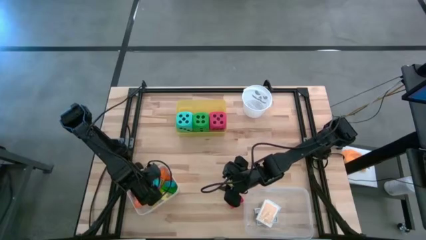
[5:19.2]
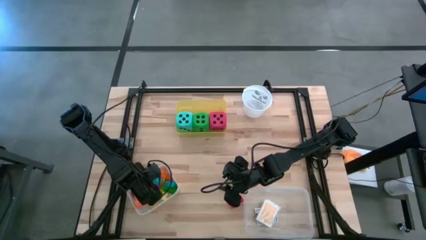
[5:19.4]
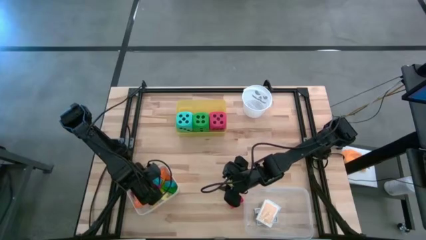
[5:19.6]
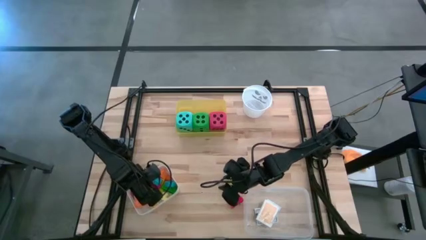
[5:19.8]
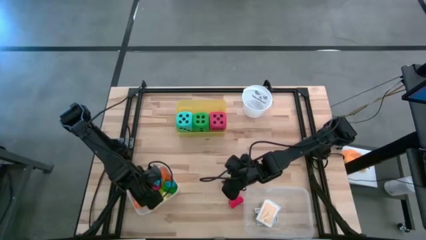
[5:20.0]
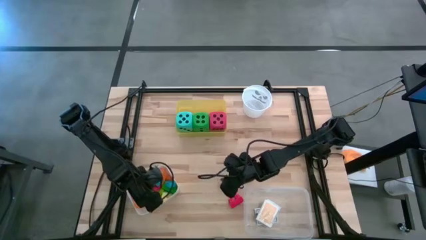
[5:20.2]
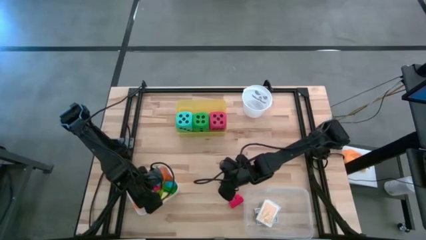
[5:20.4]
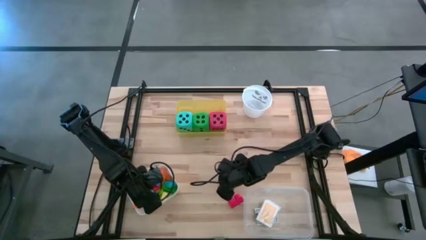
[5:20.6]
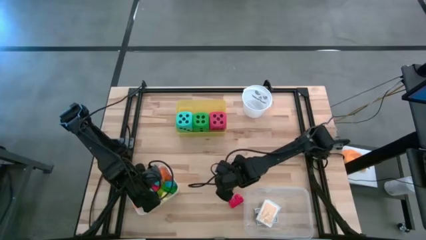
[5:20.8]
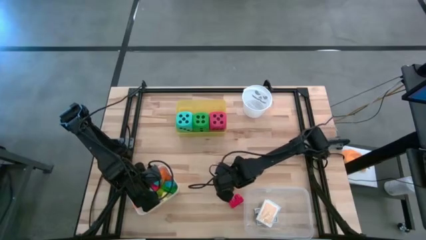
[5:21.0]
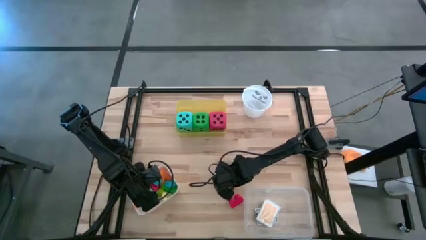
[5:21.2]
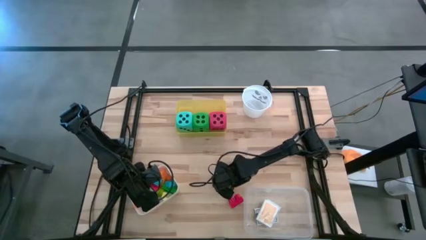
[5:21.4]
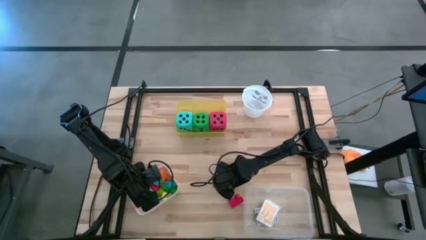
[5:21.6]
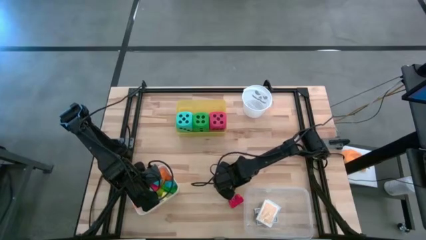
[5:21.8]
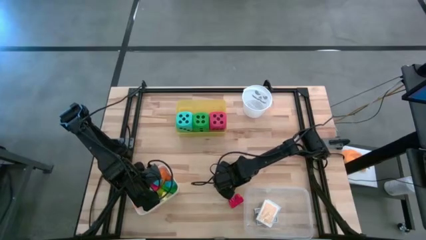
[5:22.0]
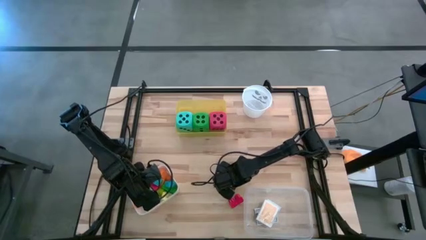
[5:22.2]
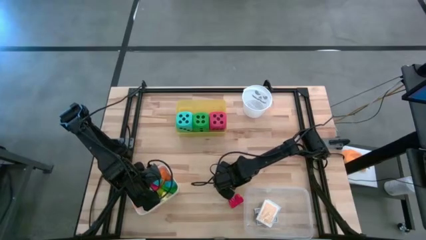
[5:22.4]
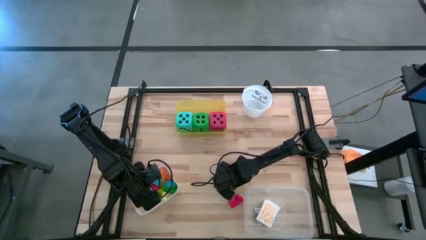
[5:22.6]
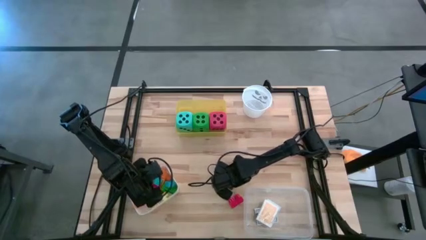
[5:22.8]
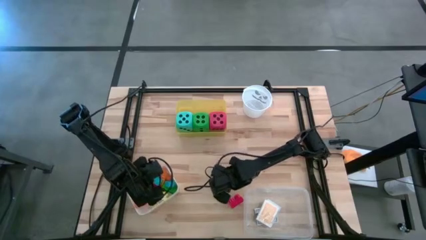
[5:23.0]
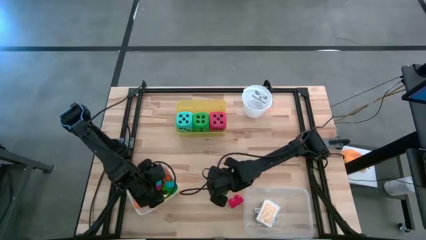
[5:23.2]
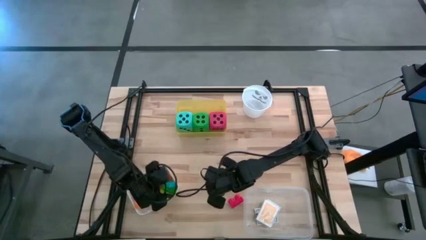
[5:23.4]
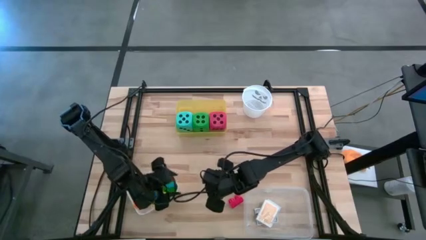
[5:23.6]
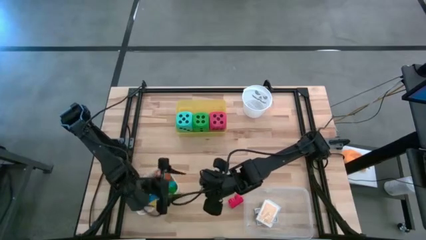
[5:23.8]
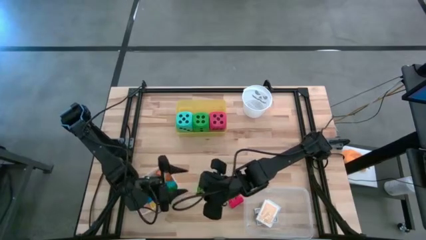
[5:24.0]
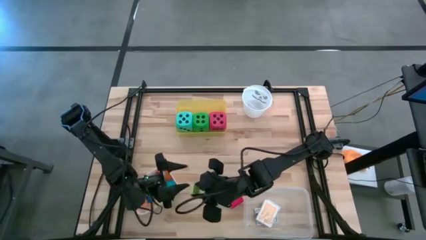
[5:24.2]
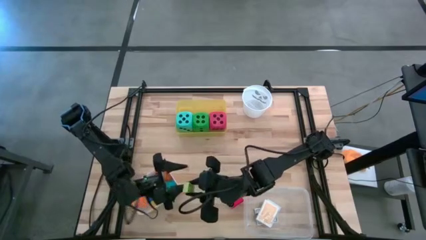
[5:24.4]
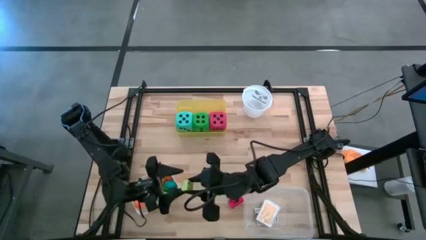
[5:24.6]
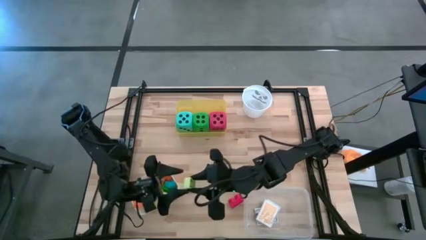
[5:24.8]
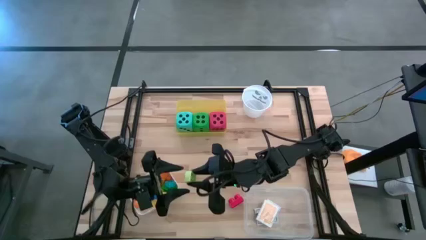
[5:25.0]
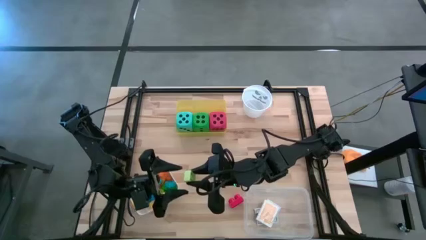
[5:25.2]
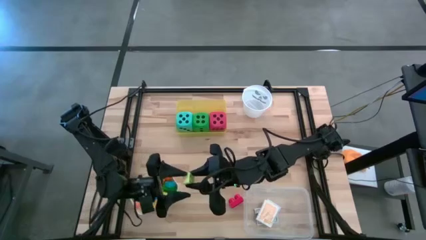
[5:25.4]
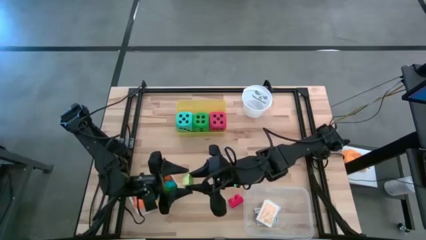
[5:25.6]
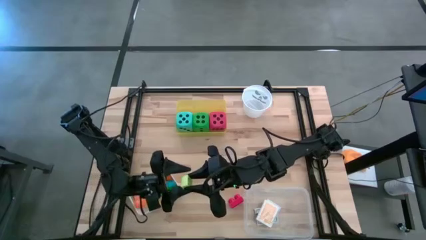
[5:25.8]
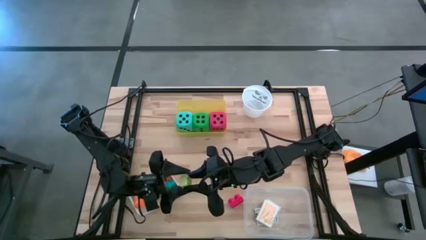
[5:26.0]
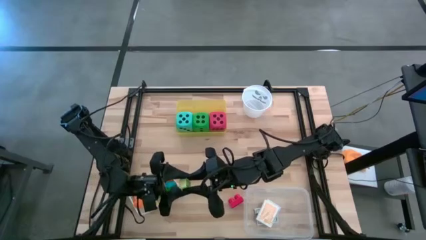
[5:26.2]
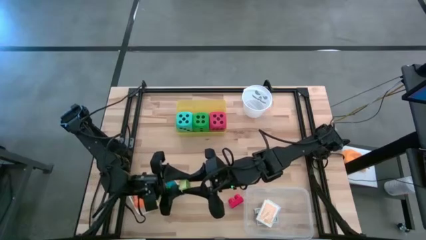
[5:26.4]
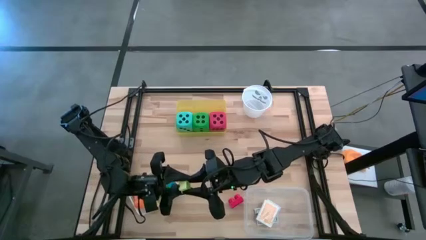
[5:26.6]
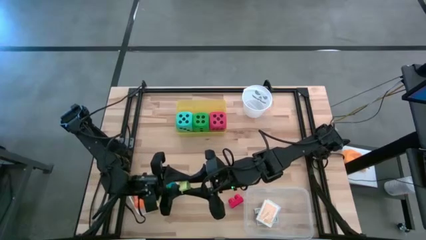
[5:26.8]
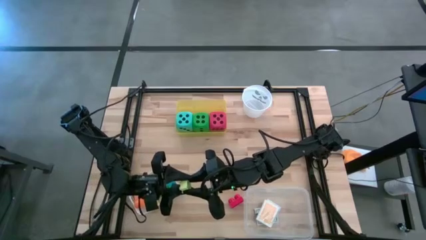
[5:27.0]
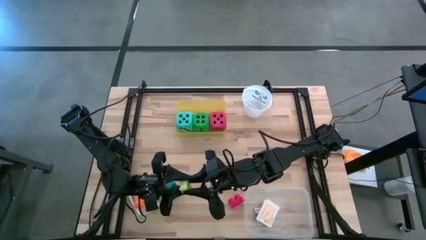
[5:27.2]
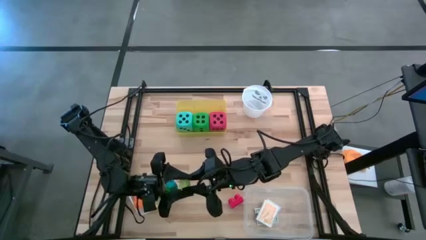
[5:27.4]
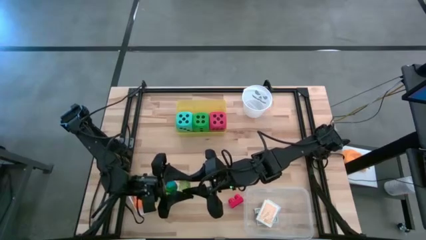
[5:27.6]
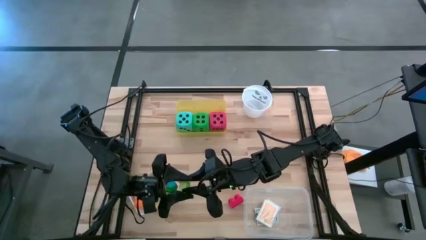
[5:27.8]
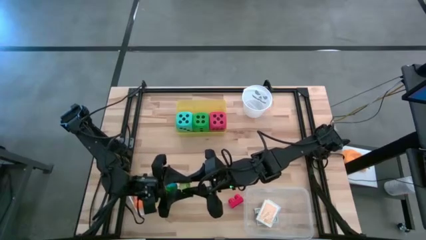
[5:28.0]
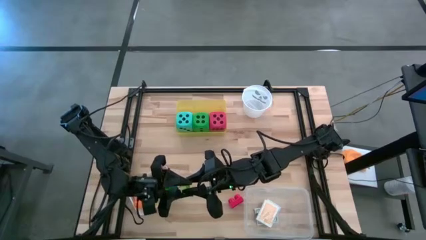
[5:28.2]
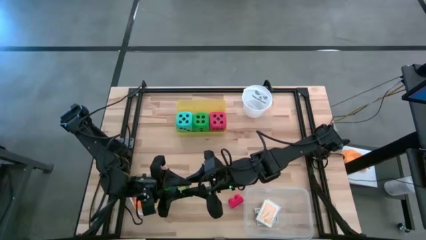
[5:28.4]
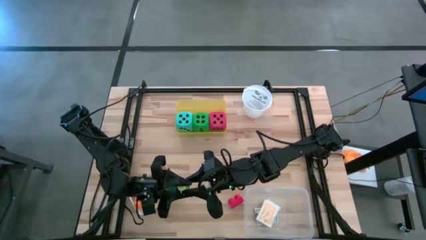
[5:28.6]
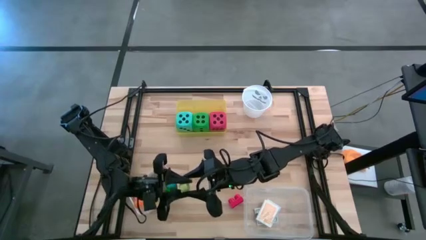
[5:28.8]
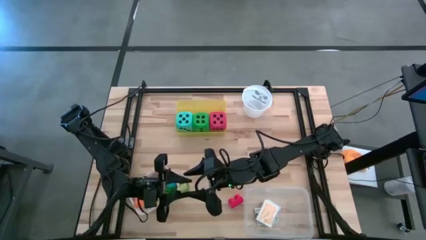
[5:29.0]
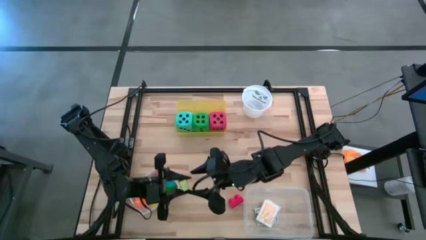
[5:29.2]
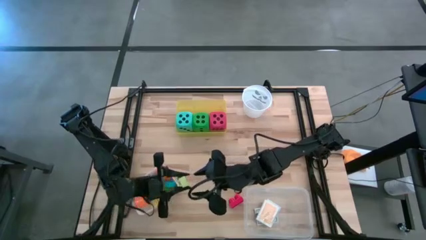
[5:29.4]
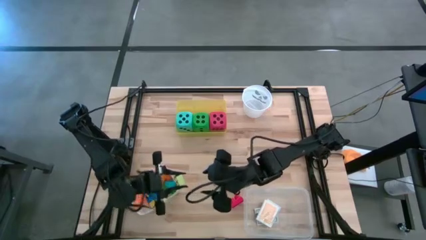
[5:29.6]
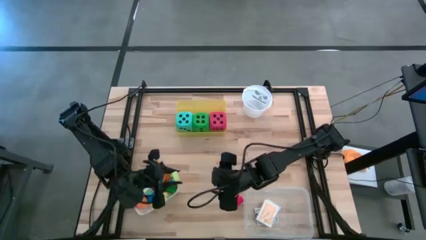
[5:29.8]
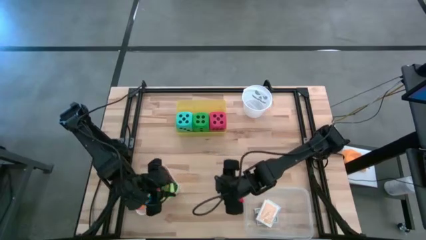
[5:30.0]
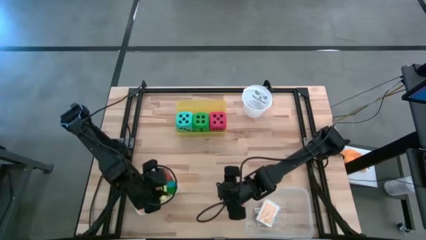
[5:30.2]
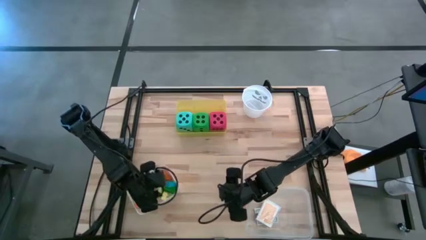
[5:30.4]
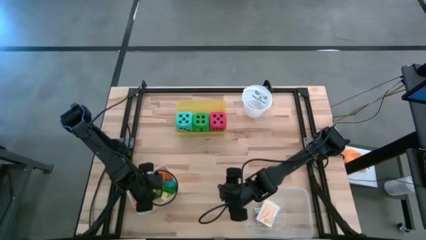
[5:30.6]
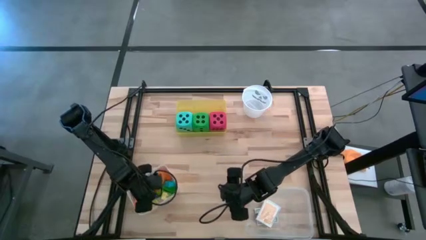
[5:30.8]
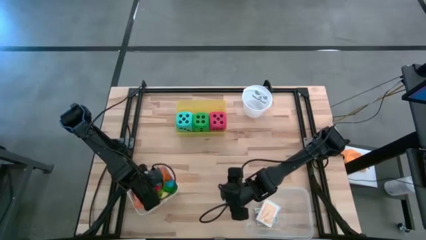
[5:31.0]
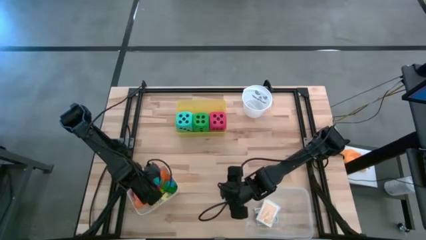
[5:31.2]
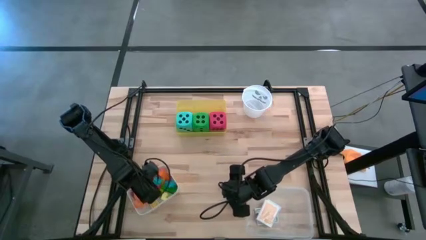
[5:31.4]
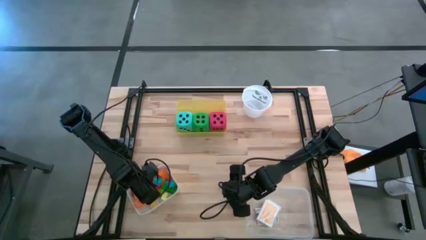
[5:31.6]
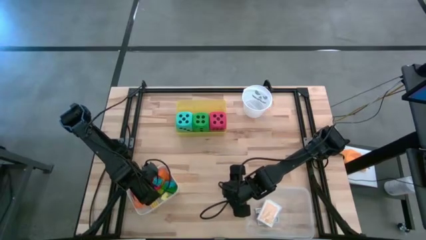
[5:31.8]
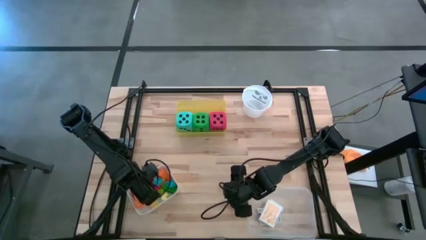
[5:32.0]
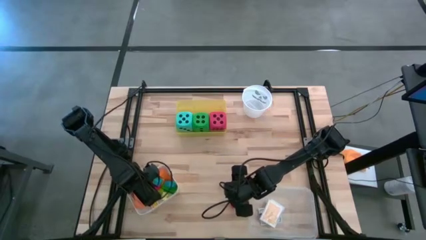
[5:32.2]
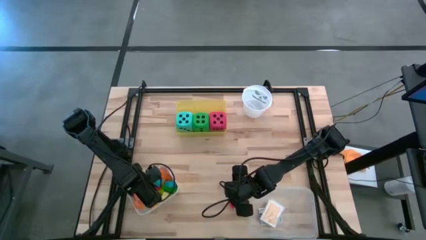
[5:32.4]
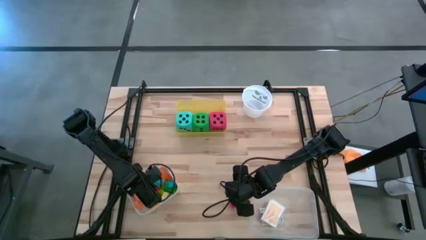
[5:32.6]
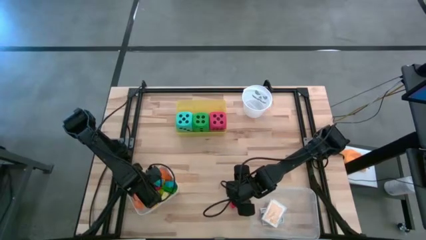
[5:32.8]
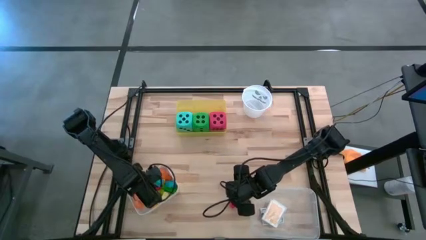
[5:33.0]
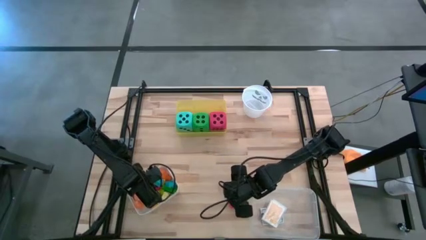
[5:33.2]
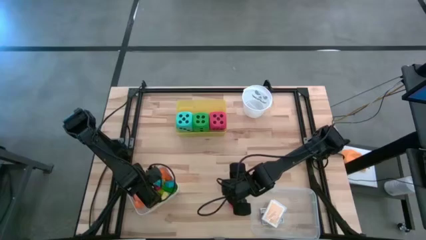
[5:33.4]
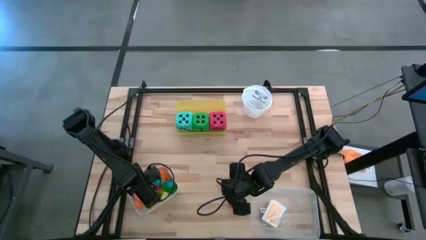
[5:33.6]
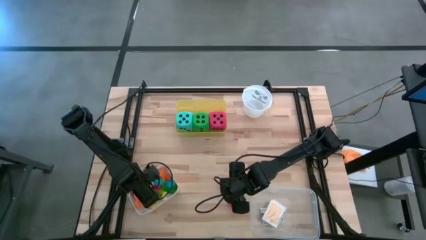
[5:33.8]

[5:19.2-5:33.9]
Task: Pick & Place Toys
Put the light green game piece into the white bin

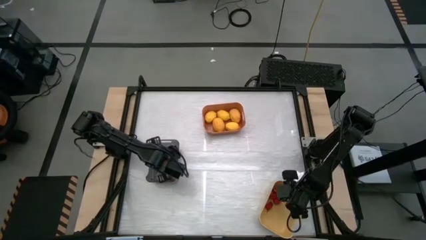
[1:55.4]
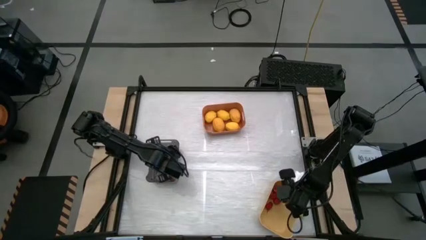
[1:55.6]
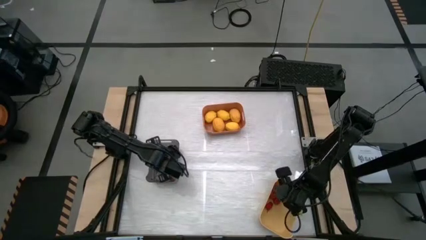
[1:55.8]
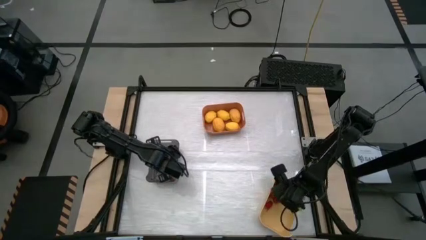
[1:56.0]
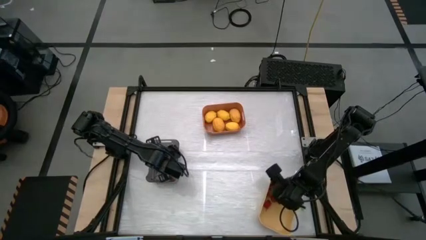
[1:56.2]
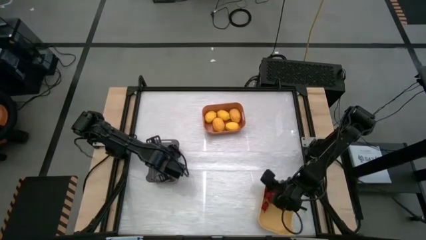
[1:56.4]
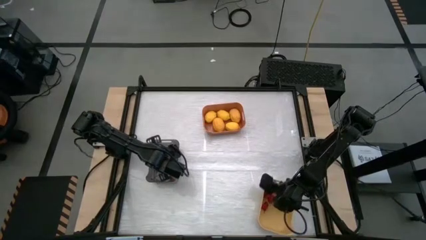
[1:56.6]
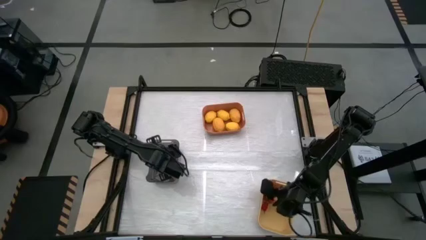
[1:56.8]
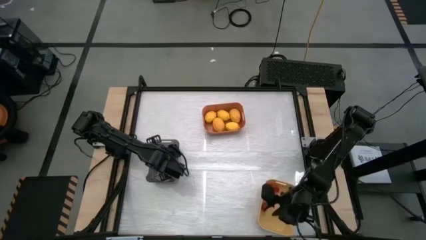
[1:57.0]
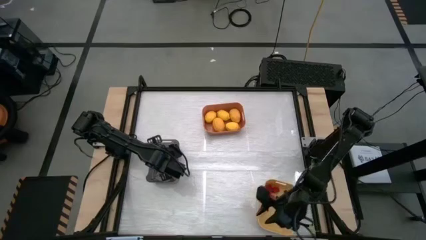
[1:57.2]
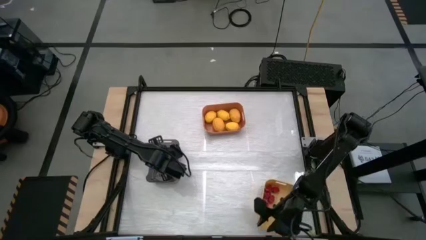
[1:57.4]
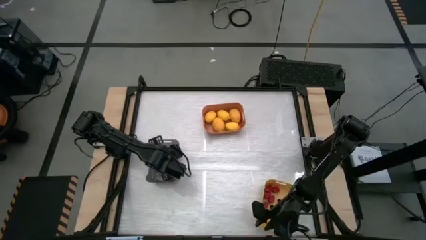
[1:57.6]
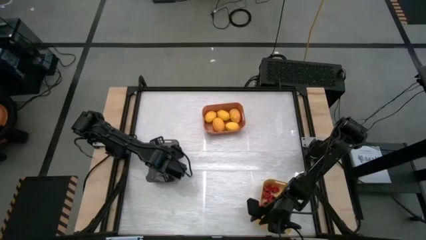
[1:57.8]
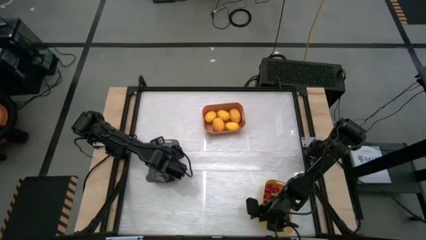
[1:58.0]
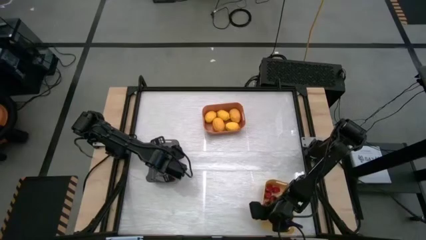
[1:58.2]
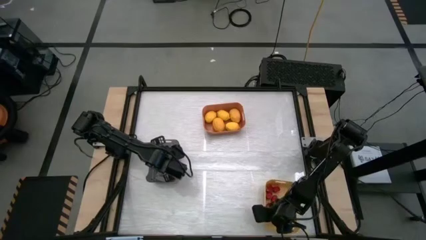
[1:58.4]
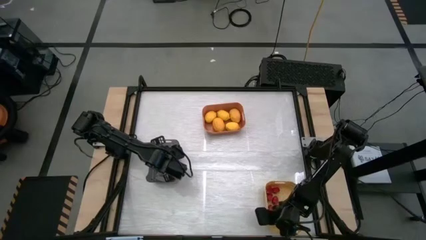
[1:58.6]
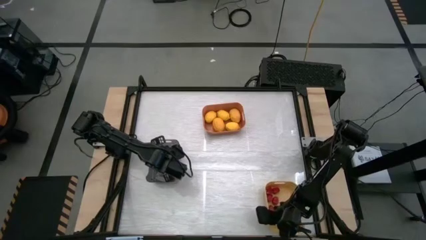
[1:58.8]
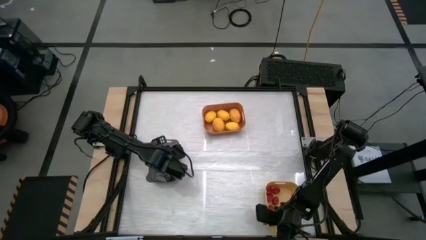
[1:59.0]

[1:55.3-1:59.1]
Task: Sort produce into baskets
Adjust the yellow bin
